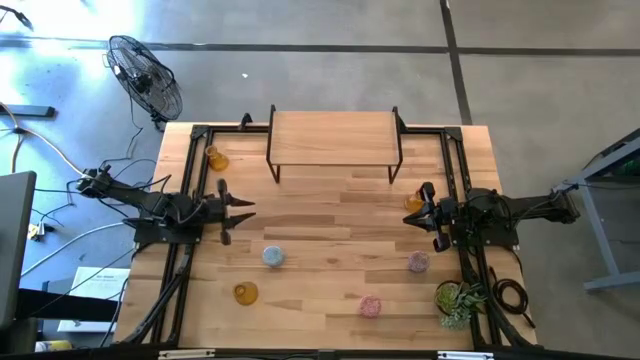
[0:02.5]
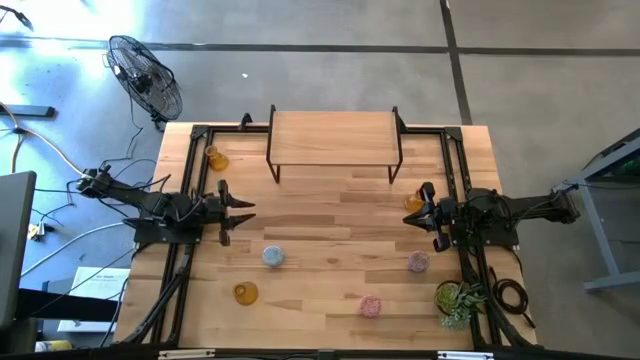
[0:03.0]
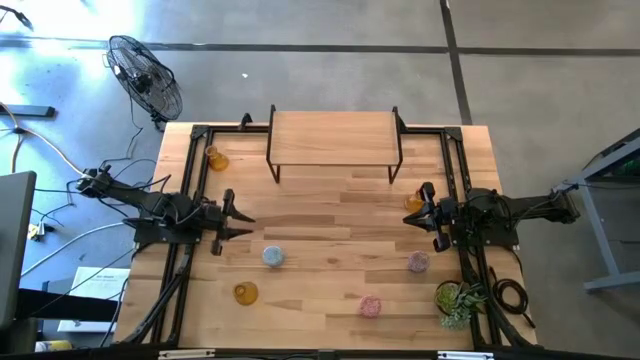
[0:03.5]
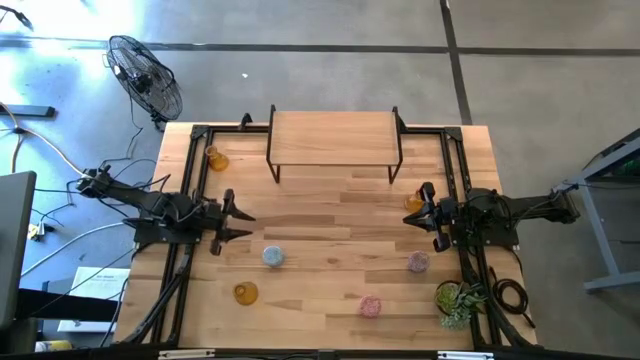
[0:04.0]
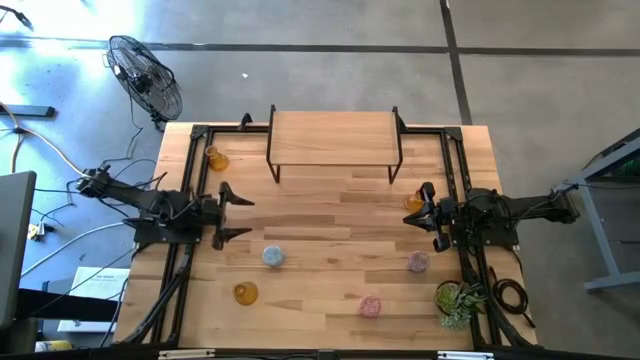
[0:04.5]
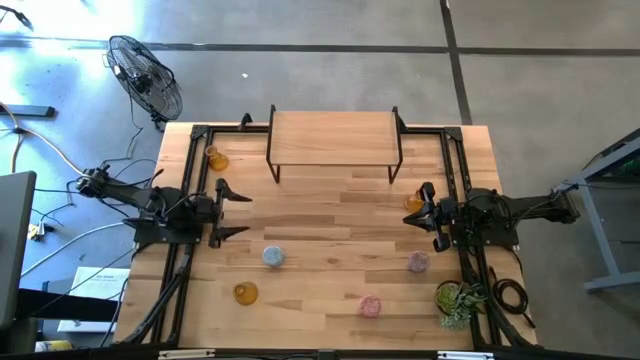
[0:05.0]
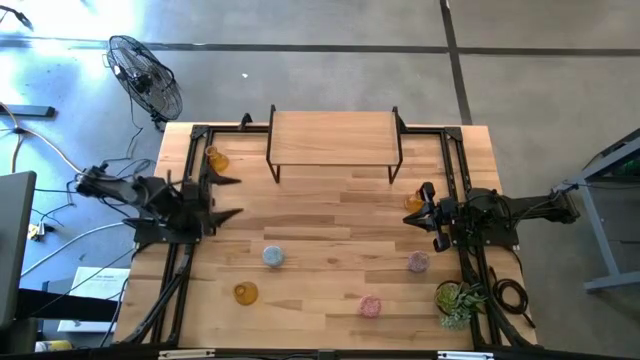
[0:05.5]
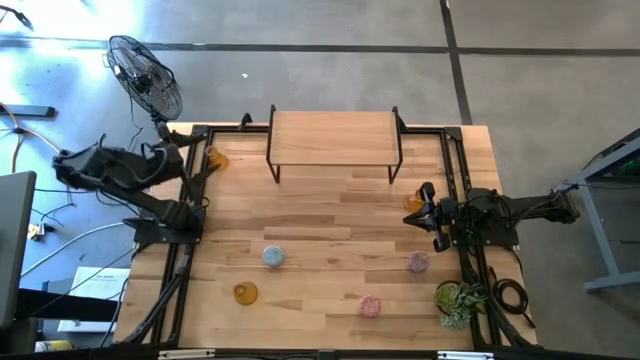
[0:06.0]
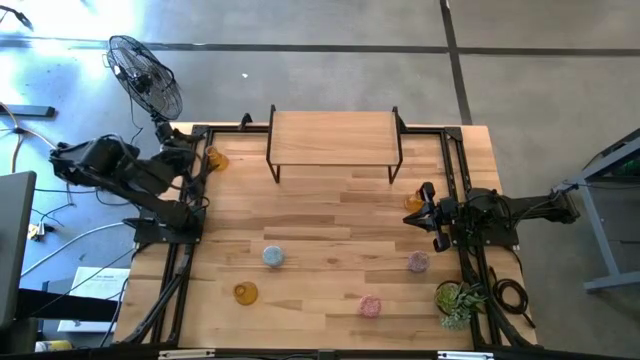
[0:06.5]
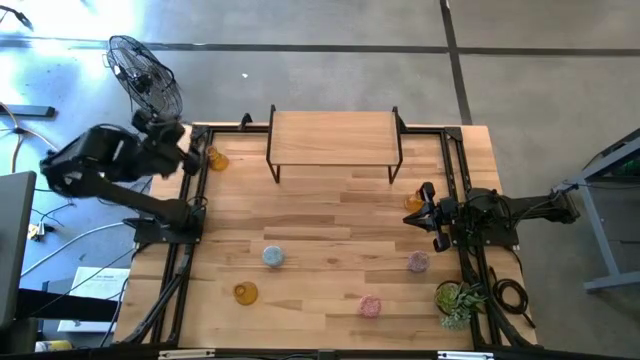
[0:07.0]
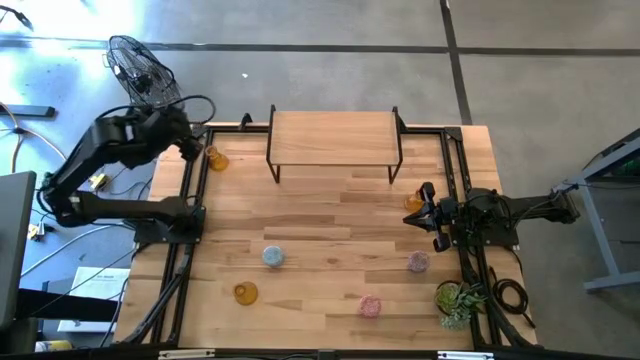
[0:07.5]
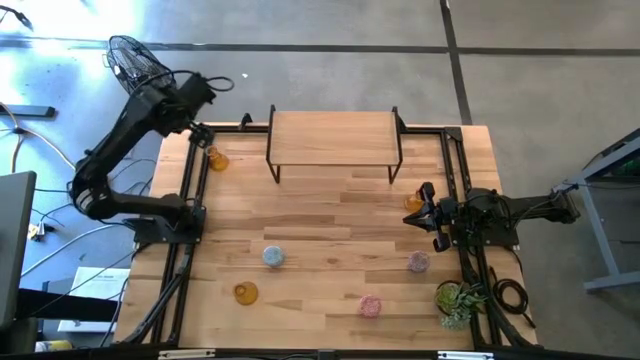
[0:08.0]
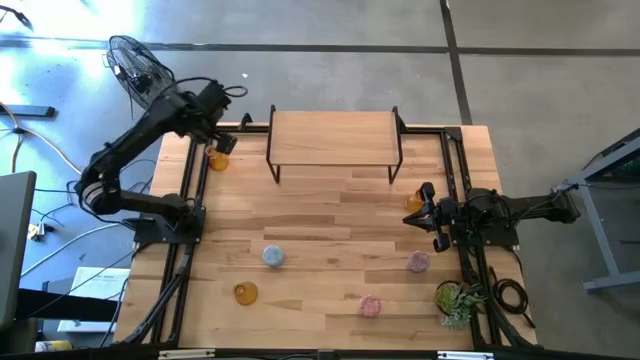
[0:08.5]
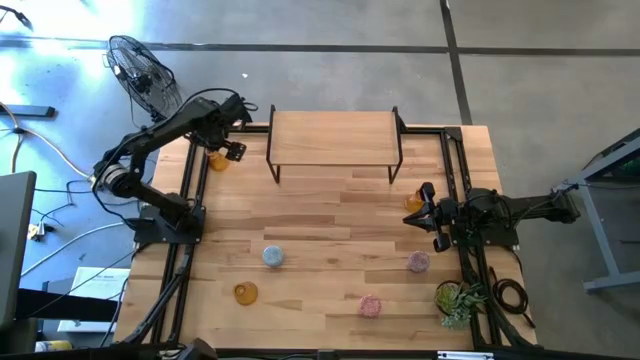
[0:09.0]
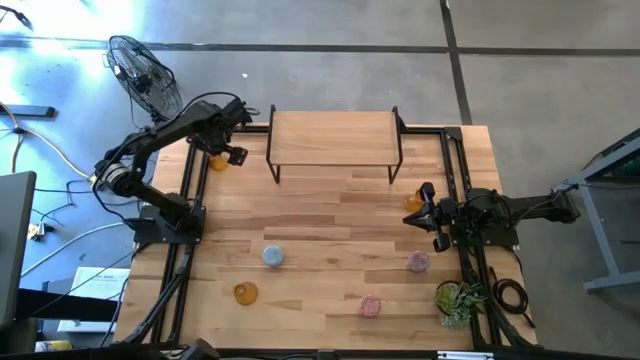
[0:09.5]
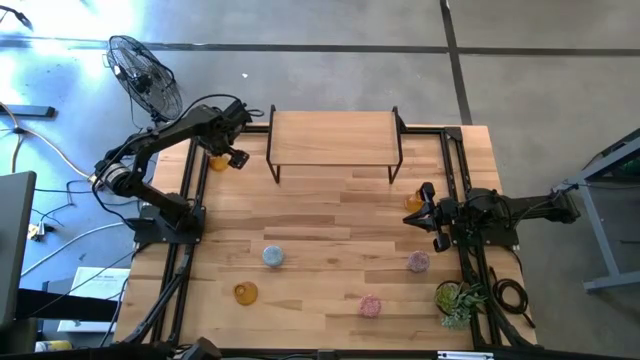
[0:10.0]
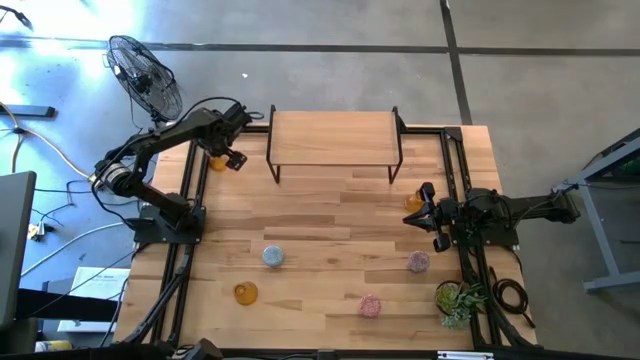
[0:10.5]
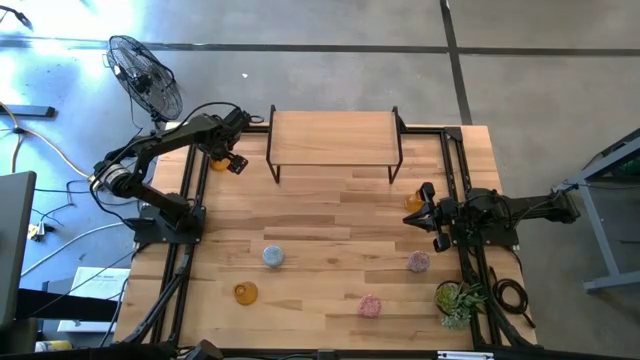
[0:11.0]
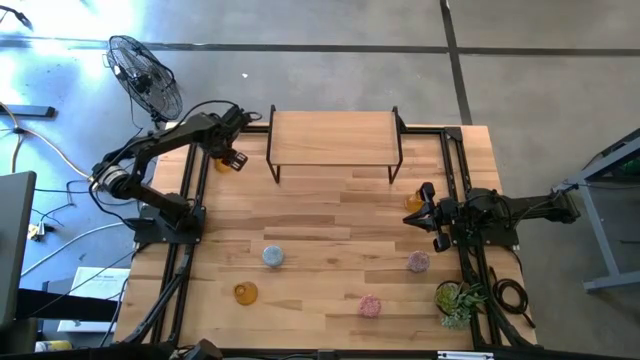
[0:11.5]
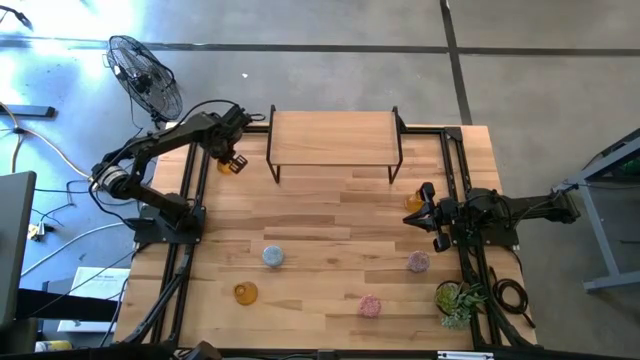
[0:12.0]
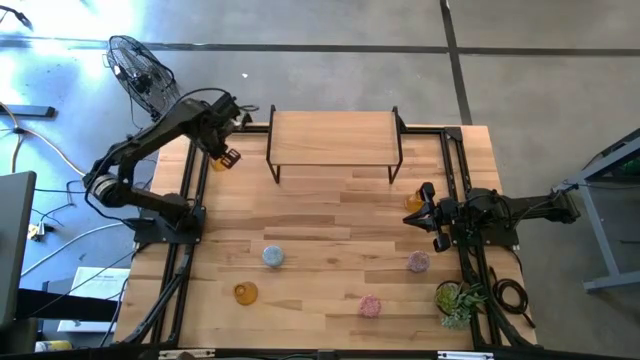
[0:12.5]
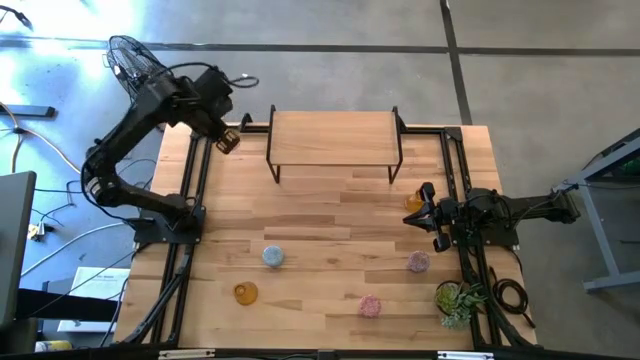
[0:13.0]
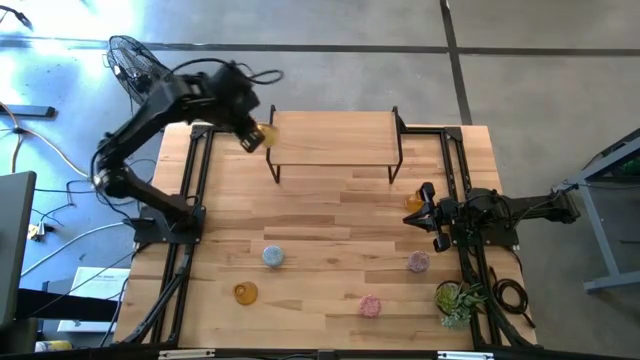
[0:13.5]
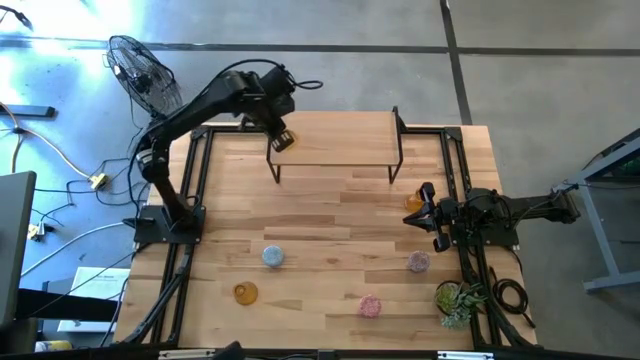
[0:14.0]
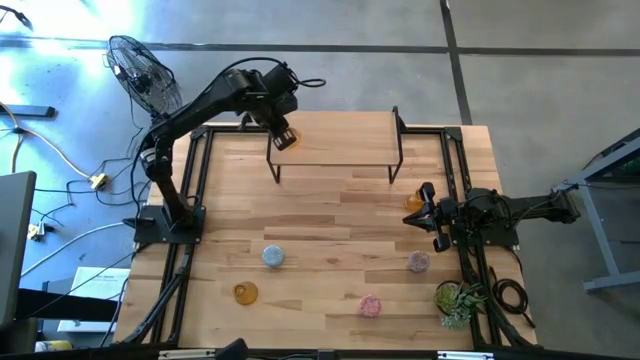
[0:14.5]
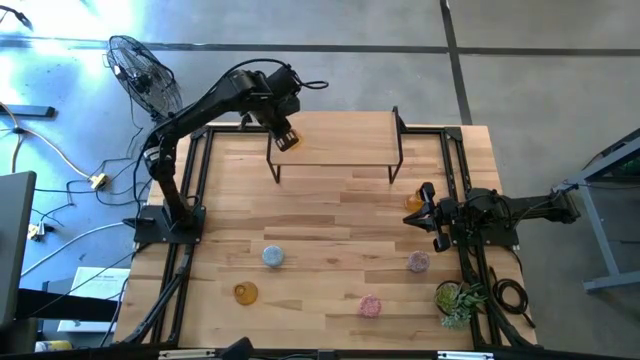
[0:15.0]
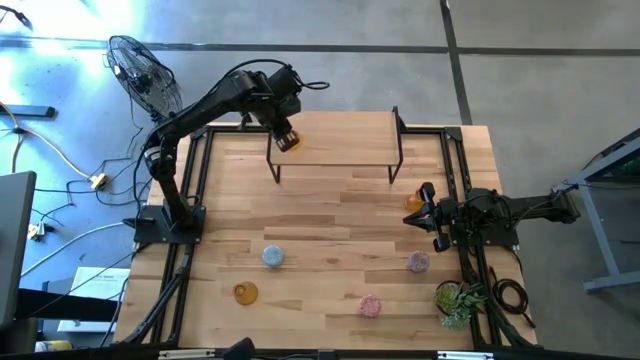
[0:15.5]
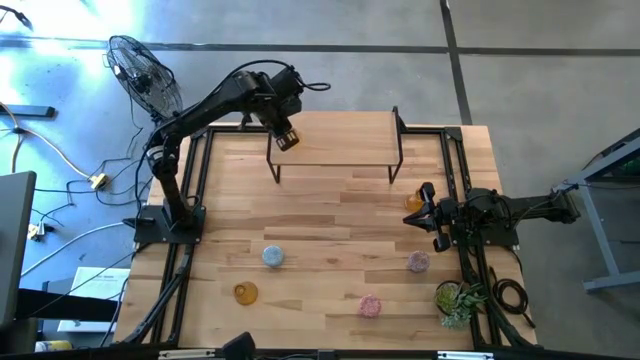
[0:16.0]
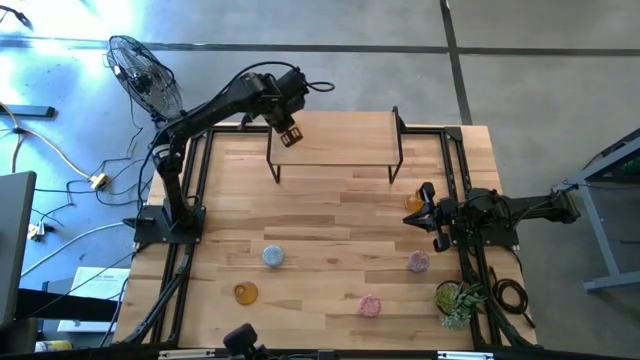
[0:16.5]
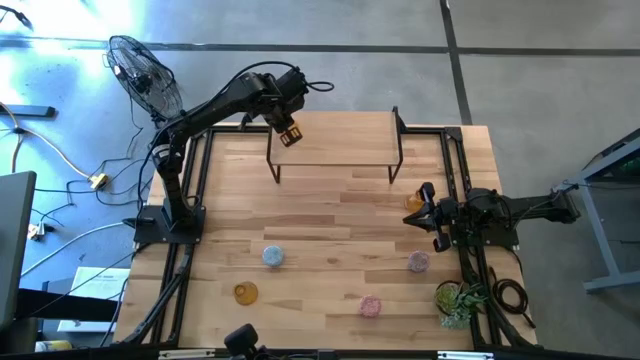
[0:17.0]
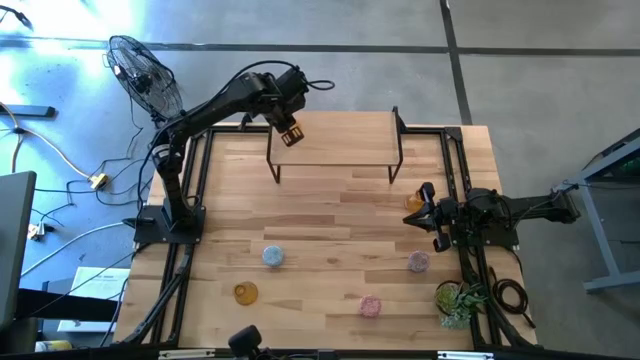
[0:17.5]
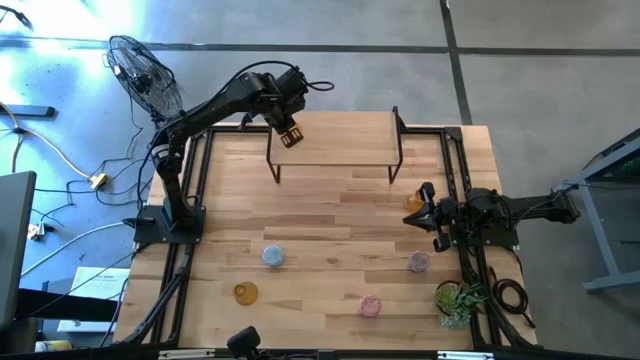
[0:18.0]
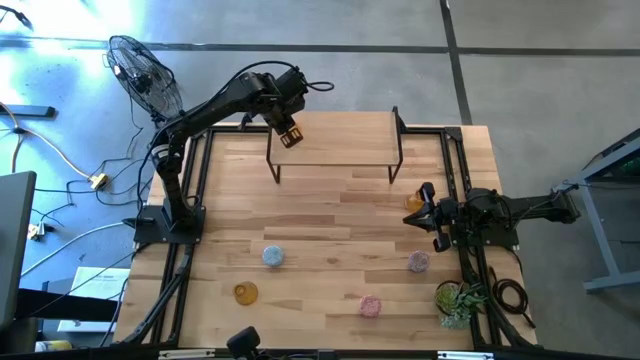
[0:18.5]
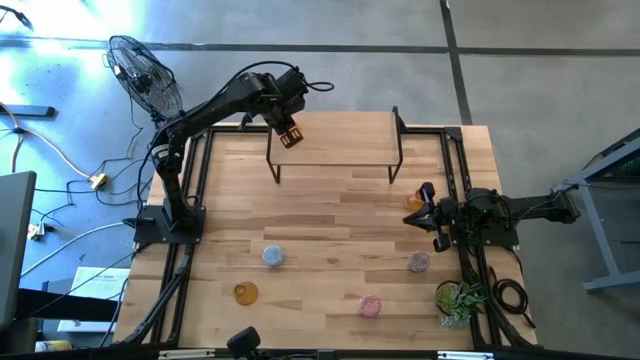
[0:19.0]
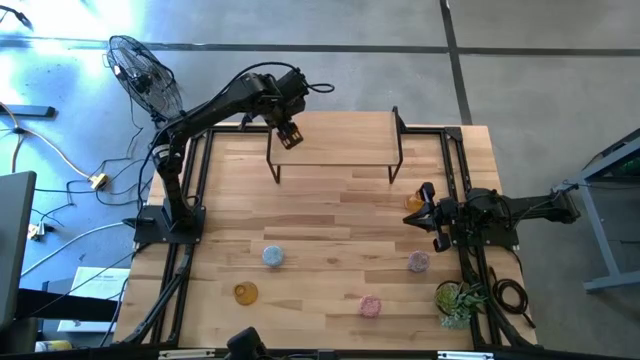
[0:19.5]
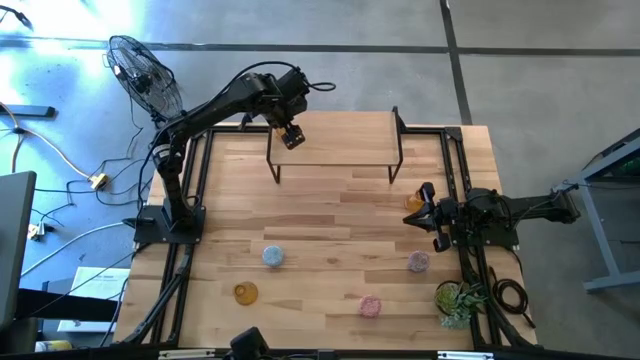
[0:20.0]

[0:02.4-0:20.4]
Task: Pick & Place candle stick holders
Put the top orange candle holder on the shelf
